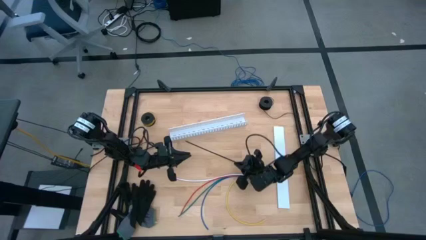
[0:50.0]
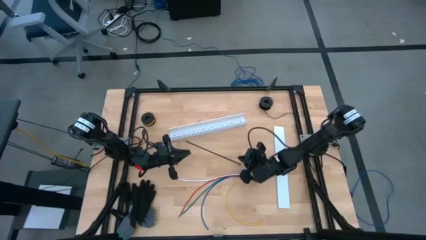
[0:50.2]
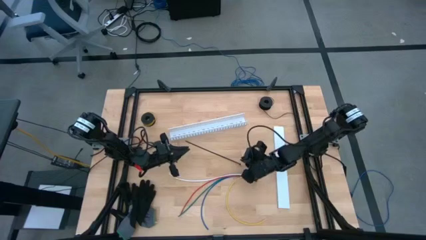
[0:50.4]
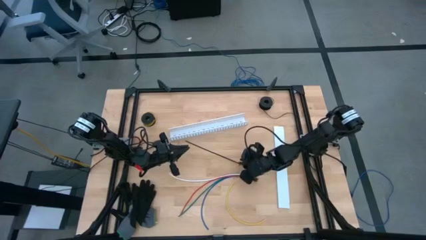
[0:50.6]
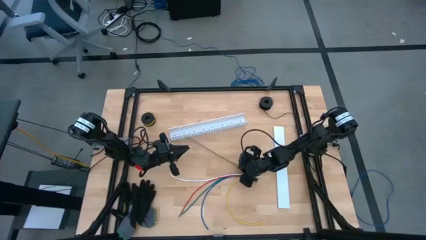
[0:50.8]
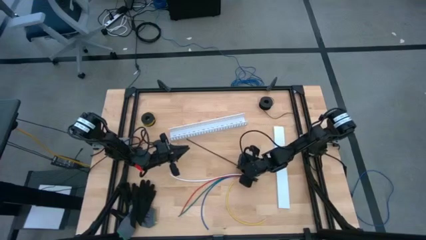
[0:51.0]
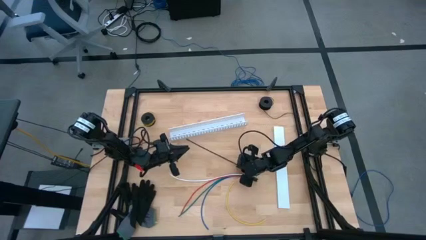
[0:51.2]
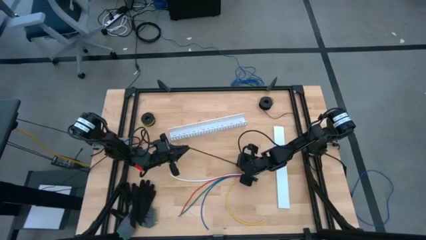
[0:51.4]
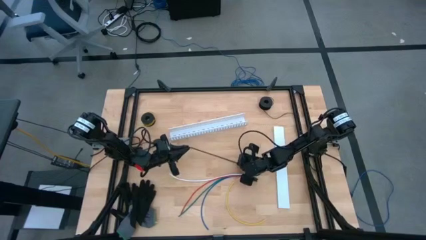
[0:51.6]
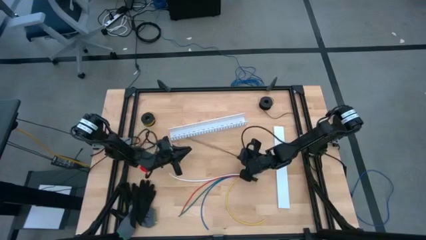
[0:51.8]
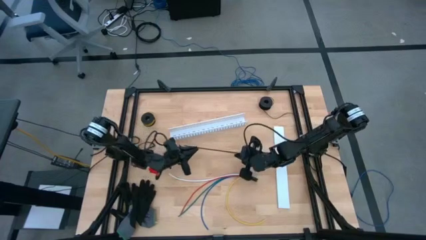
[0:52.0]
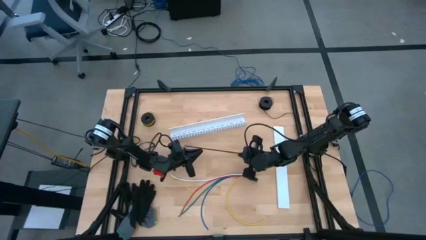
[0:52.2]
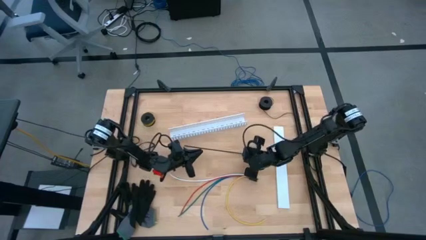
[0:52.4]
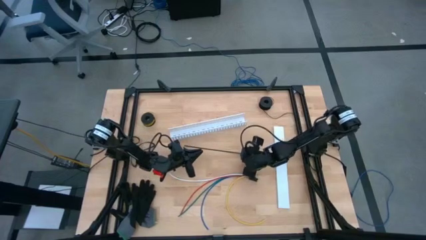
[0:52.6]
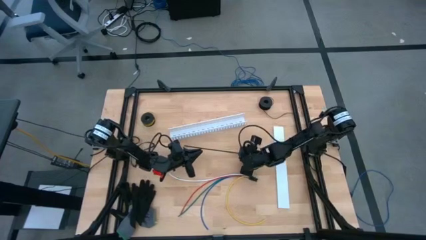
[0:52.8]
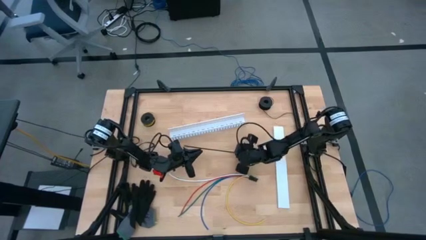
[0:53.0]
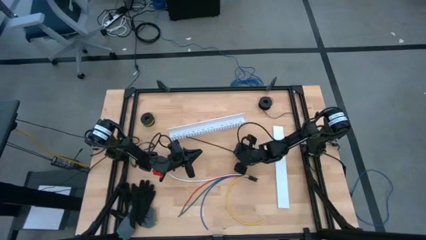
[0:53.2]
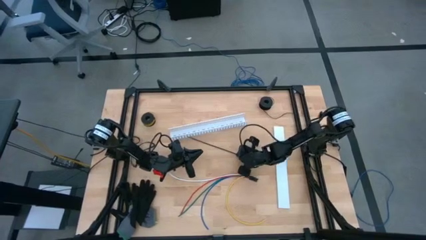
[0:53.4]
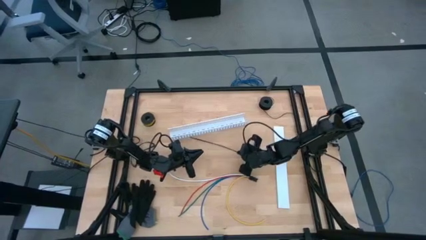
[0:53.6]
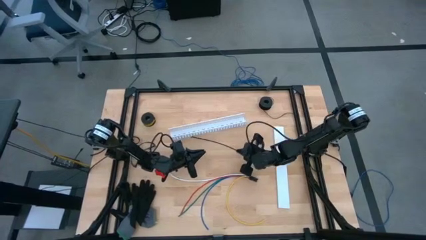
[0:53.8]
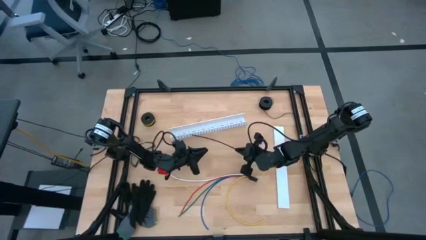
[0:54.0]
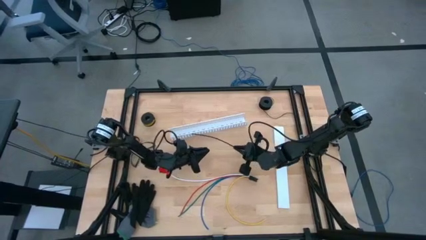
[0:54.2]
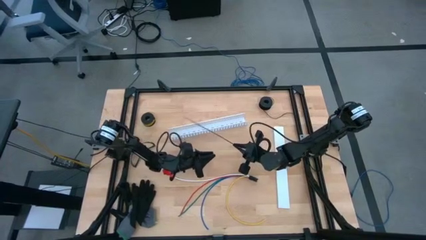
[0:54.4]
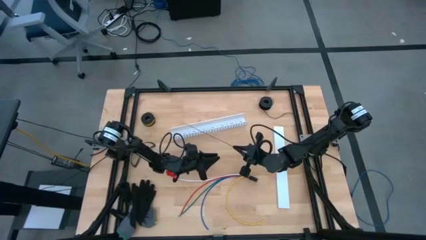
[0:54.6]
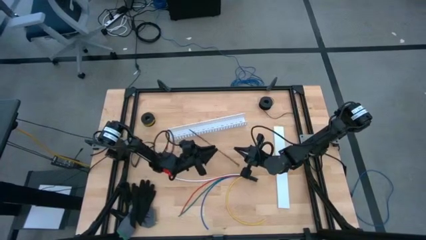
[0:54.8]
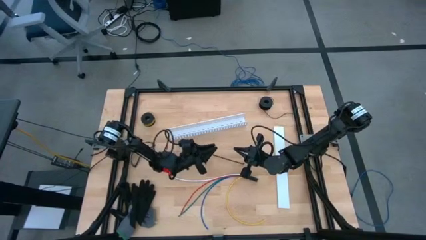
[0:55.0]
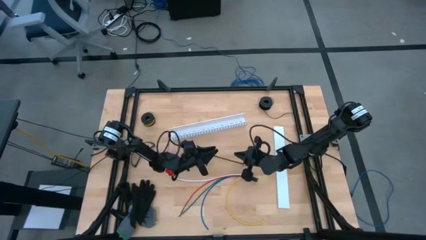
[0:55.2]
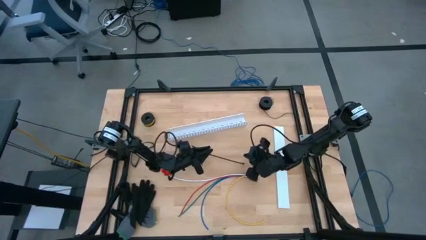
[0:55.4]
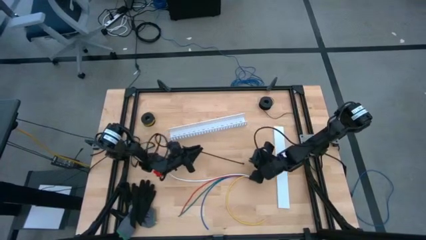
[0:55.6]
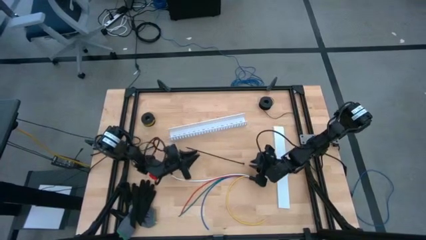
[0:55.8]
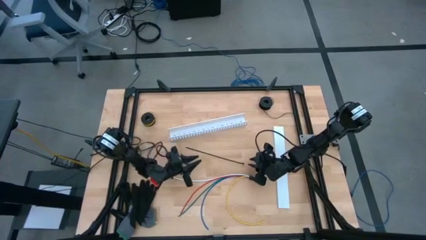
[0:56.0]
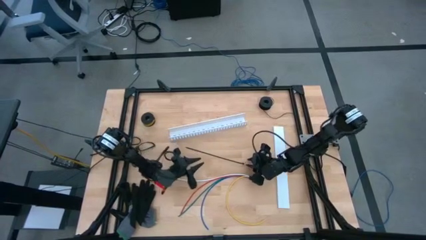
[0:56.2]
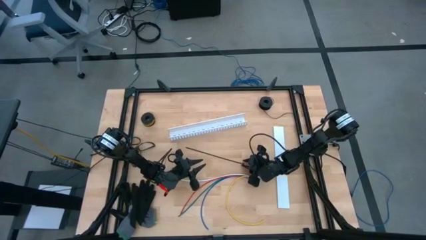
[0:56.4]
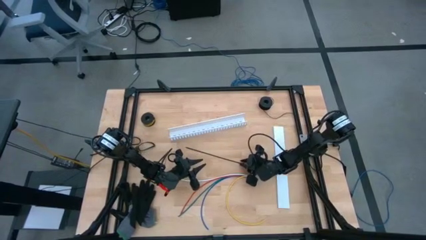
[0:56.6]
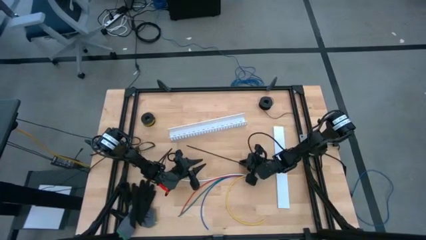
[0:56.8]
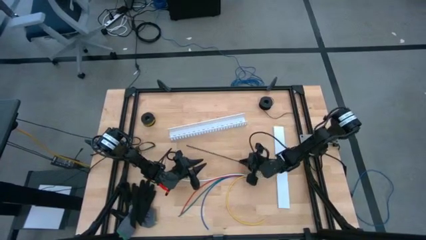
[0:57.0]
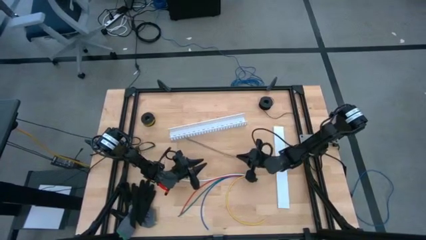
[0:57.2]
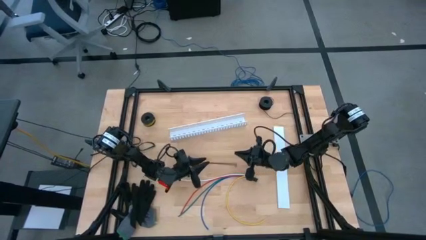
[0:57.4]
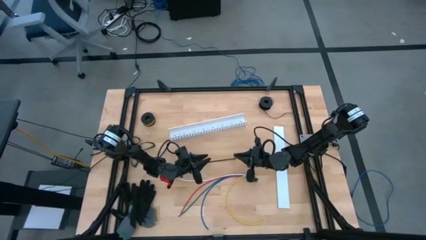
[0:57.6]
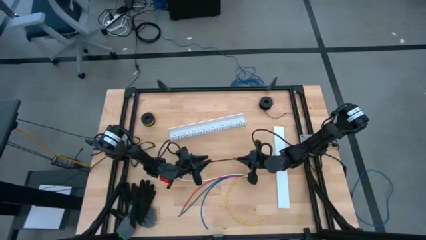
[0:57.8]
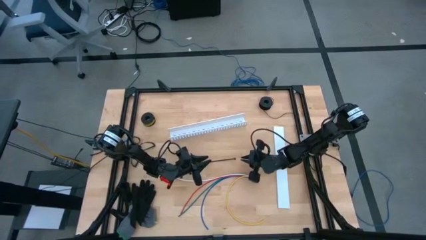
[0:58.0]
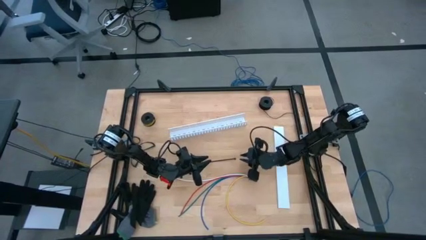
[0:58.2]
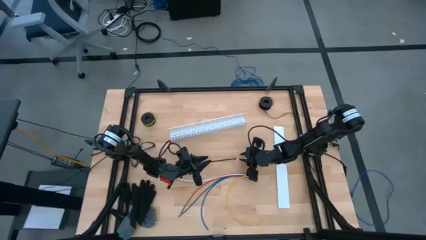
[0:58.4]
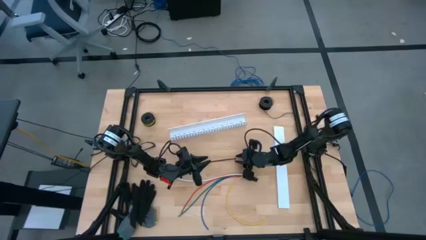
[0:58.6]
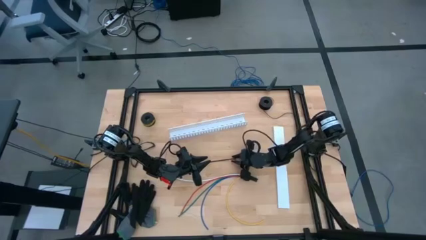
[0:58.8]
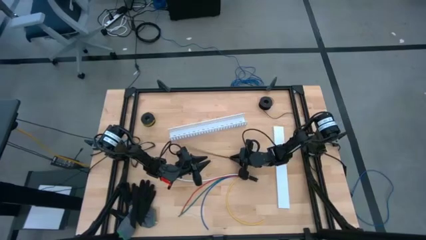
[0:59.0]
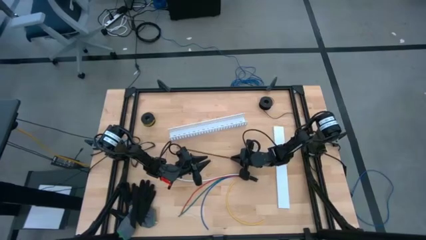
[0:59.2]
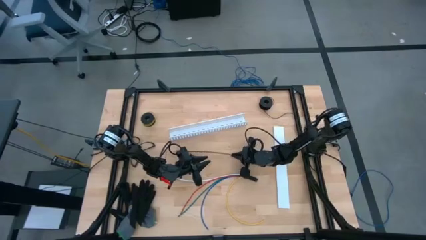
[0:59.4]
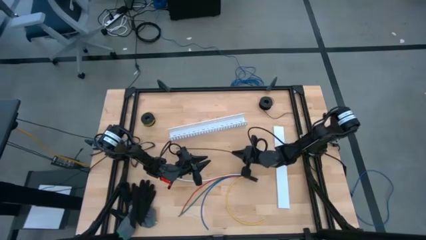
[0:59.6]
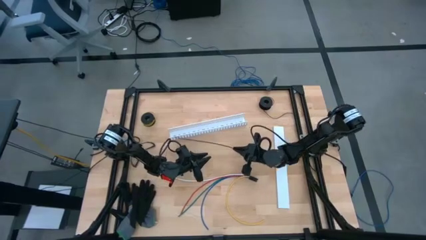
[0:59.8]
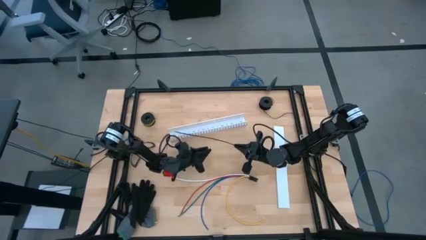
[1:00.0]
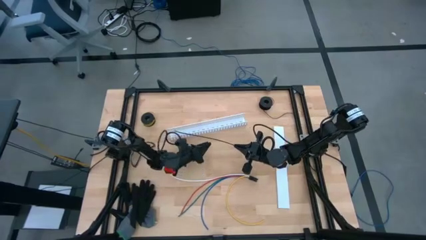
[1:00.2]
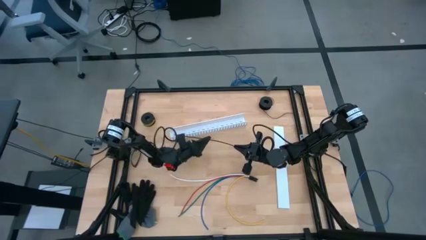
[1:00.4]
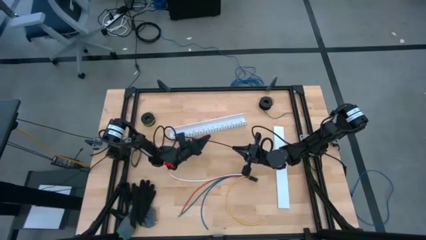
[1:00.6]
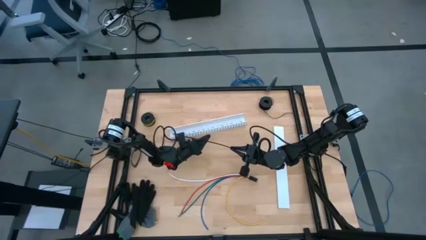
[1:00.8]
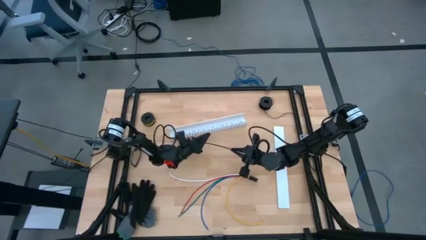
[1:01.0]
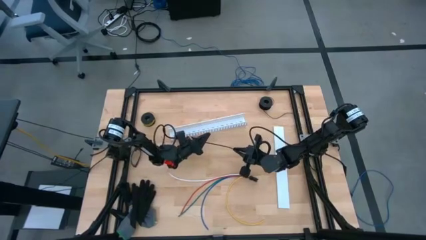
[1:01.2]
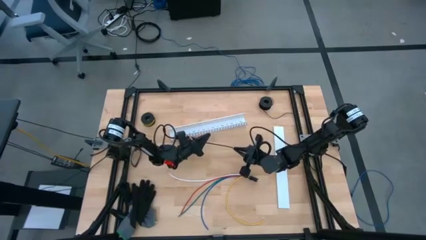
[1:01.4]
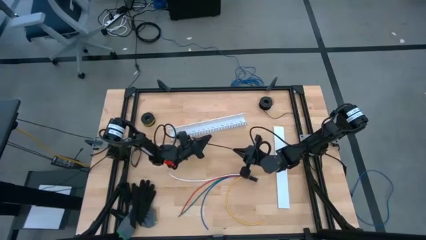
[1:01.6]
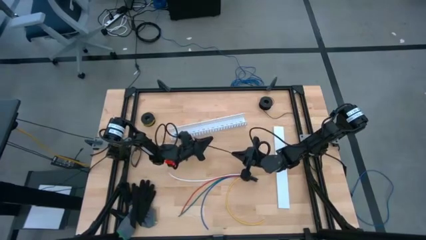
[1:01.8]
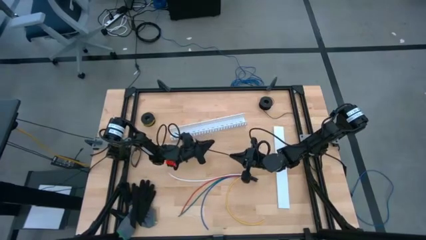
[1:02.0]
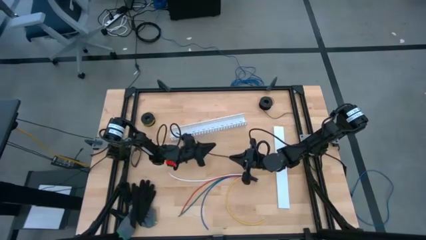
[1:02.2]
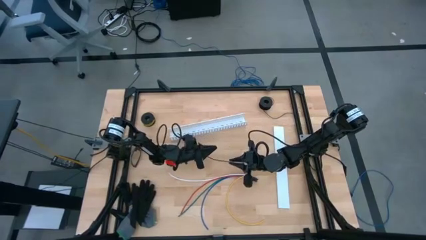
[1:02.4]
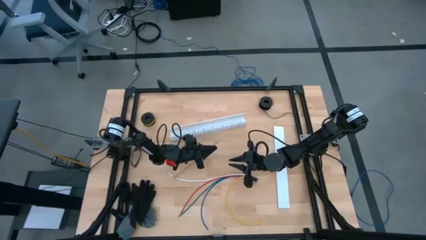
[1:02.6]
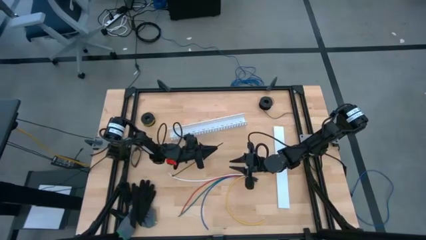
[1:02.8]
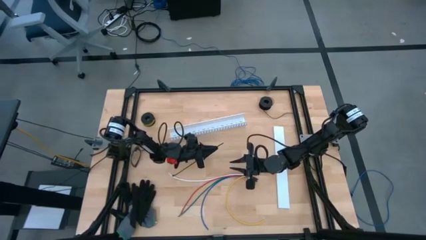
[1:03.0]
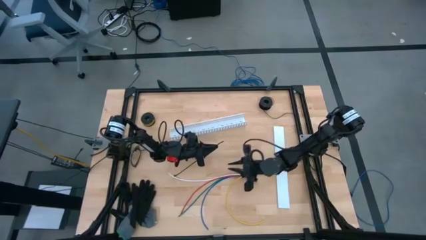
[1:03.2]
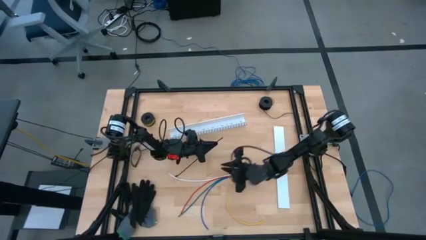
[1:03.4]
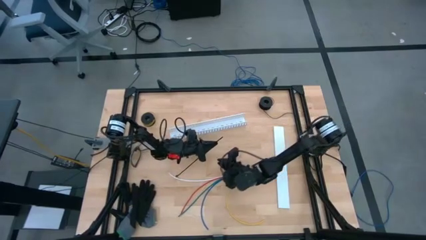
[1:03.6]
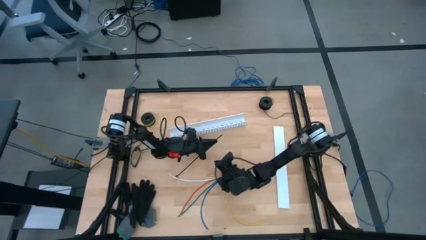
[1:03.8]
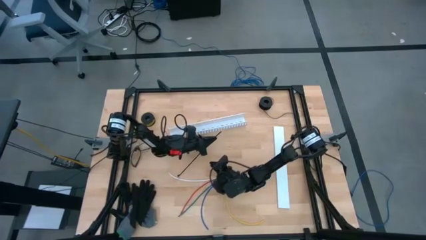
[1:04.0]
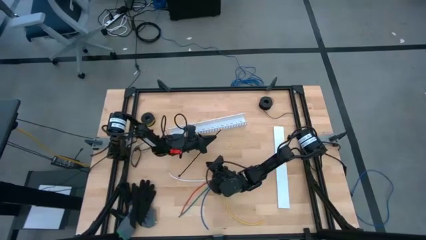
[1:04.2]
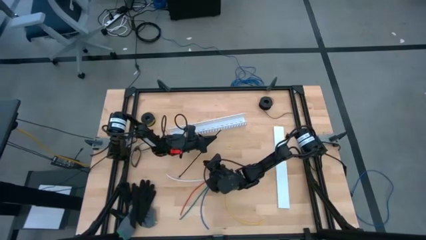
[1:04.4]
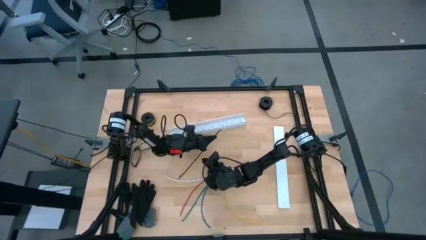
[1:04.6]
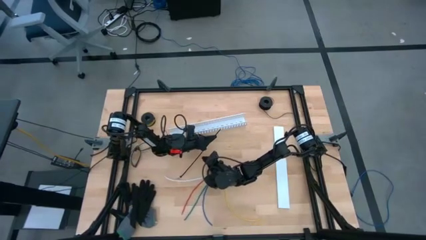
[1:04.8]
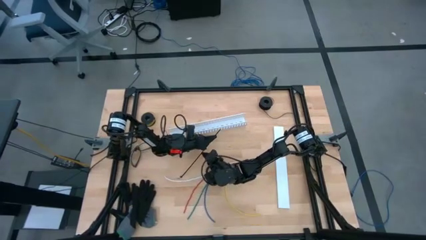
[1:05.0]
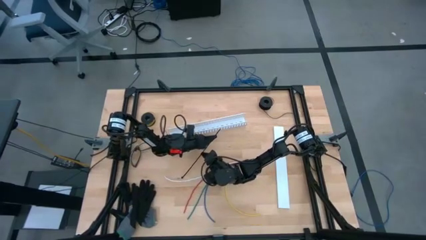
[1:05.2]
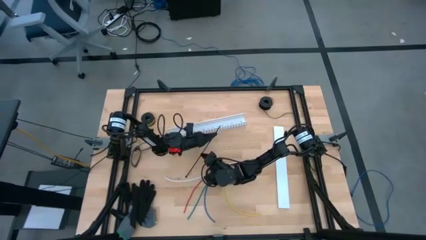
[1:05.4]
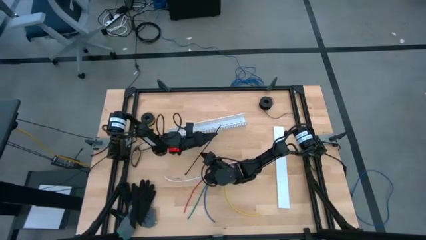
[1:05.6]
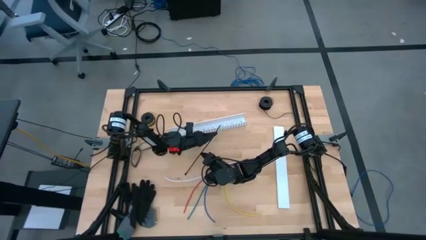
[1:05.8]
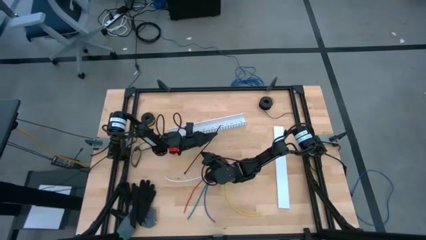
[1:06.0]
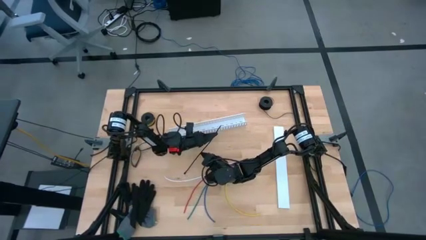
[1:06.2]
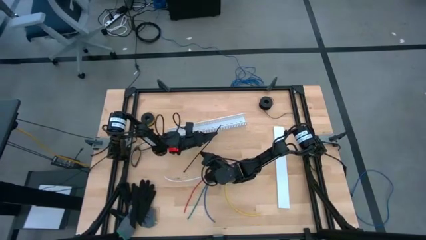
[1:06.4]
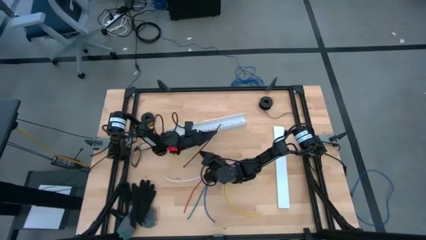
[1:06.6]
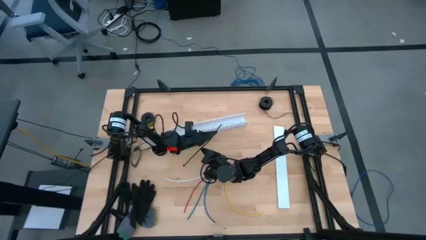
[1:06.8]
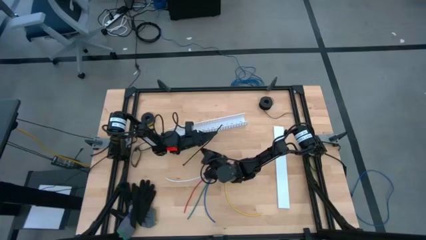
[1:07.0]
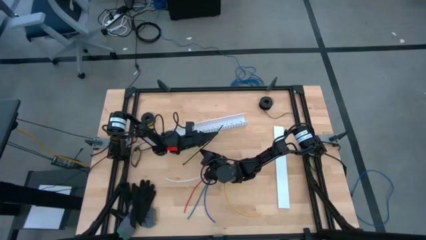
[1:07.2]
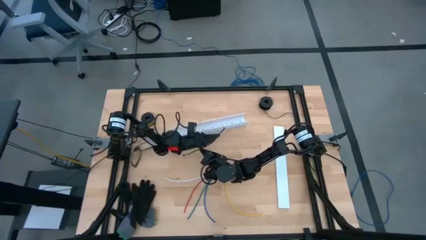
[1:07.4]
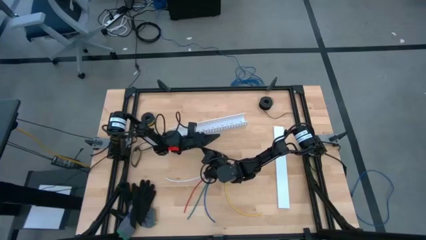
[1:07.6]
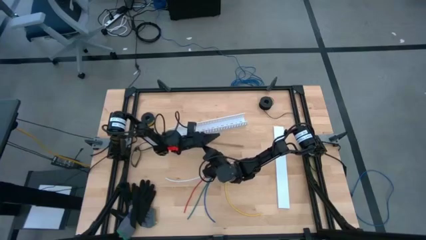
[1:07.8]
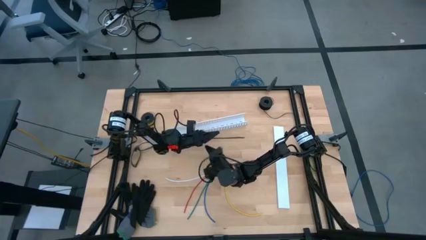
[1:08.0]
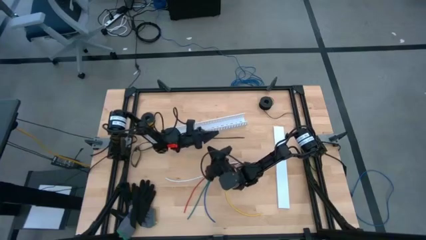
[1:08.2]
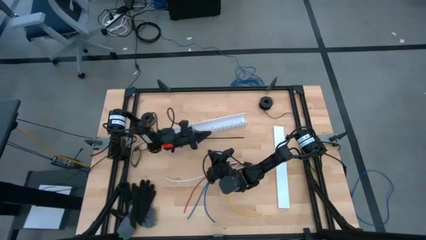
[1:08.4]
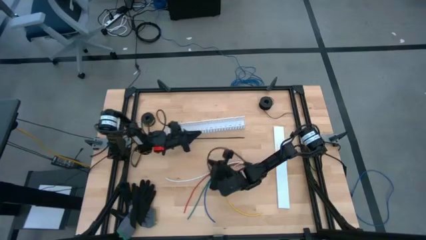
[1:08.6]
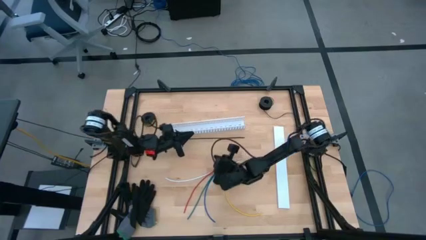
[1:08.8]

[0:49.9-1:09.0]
Task: Ziptie cables
Insert zip tie on the cable wire
